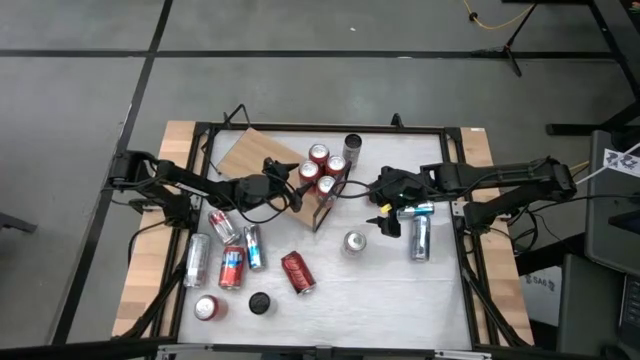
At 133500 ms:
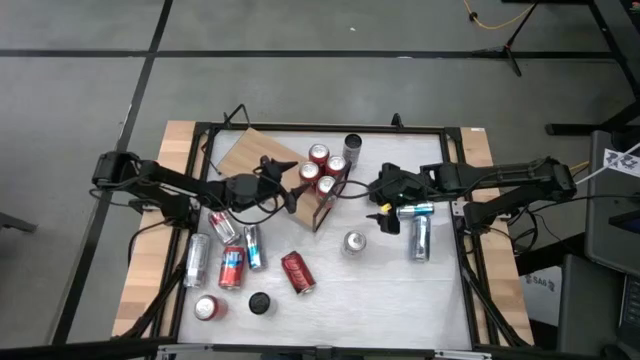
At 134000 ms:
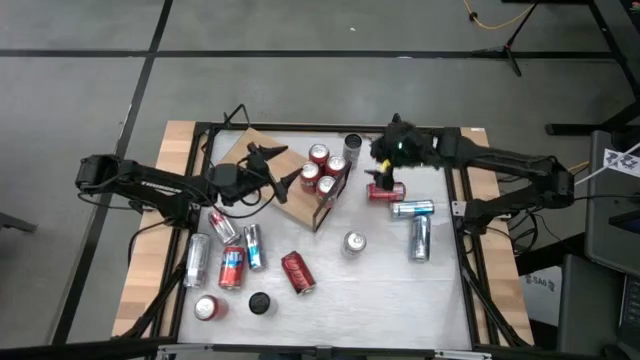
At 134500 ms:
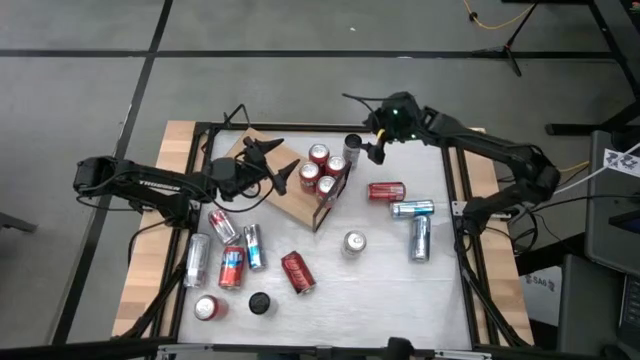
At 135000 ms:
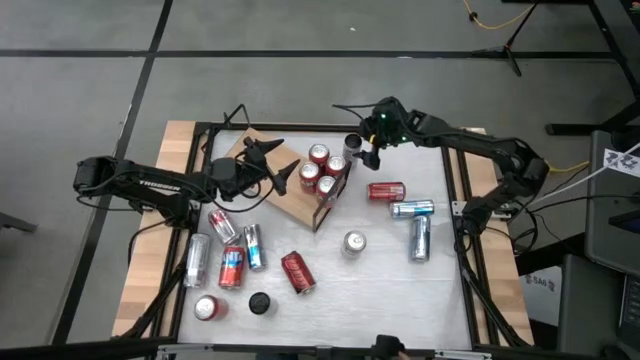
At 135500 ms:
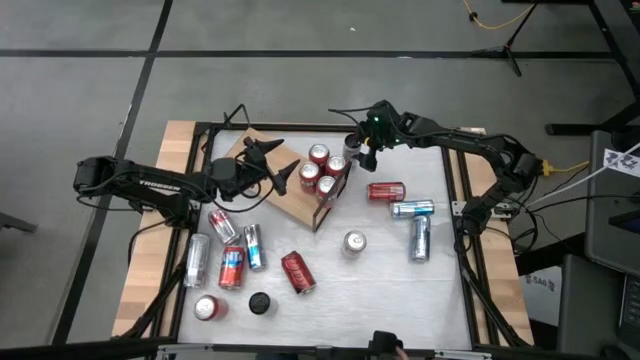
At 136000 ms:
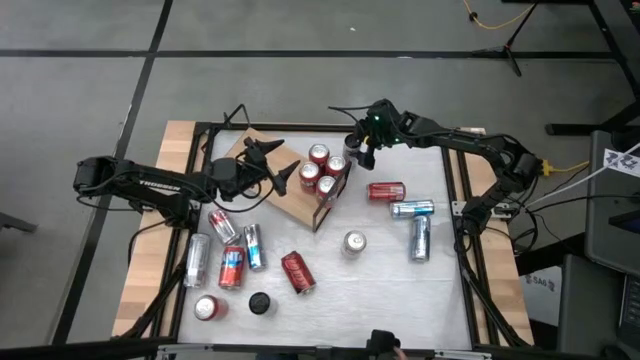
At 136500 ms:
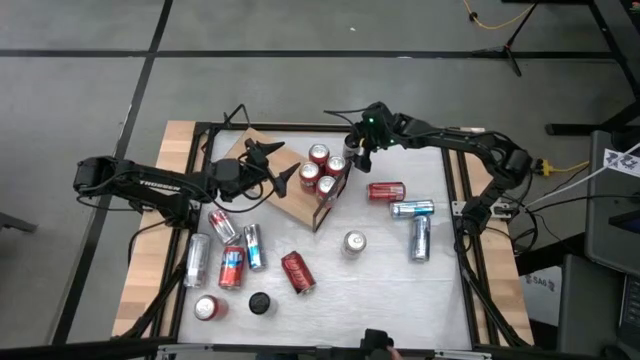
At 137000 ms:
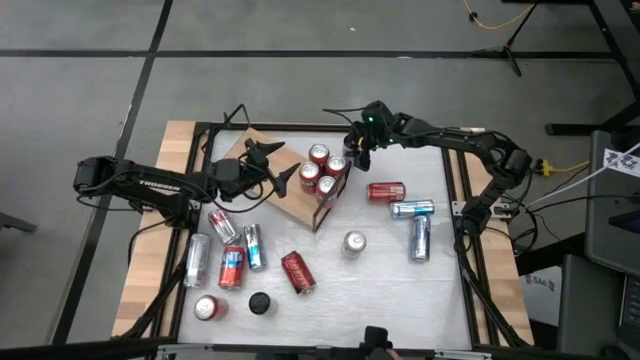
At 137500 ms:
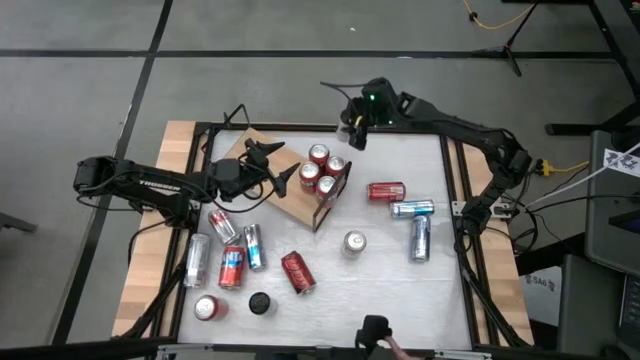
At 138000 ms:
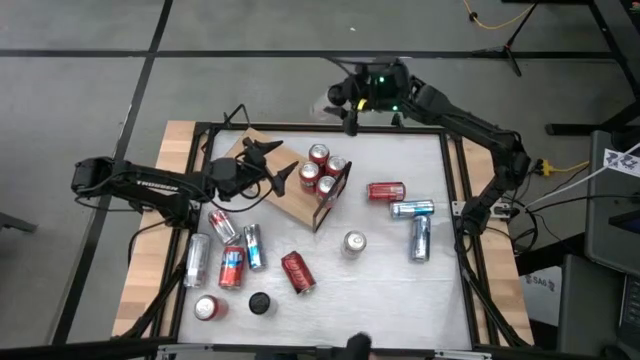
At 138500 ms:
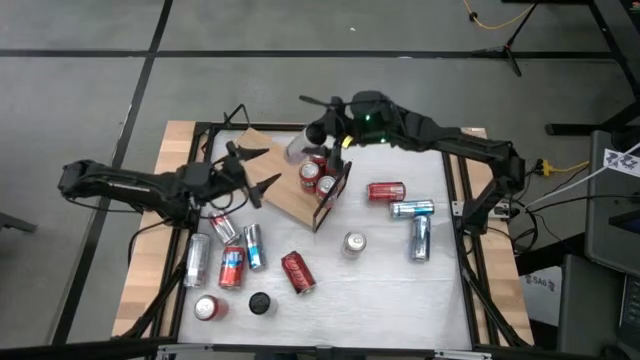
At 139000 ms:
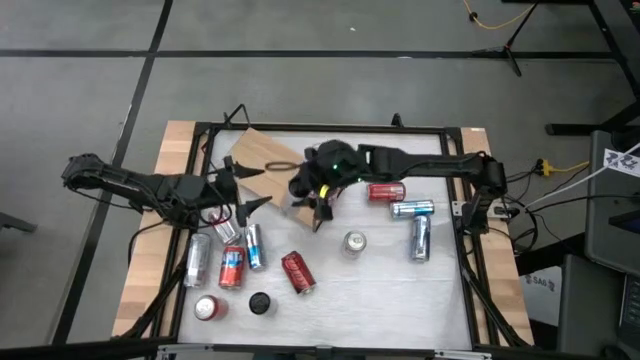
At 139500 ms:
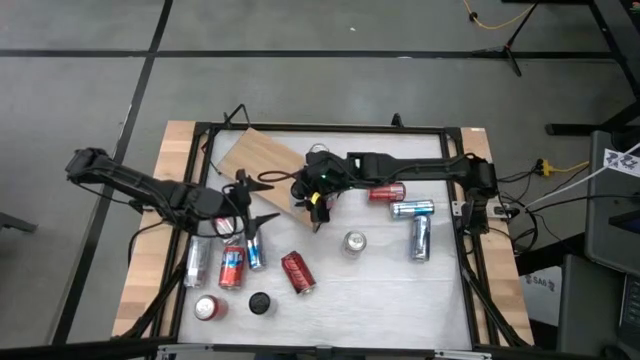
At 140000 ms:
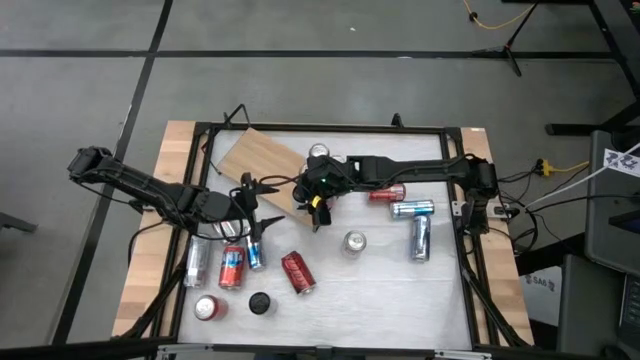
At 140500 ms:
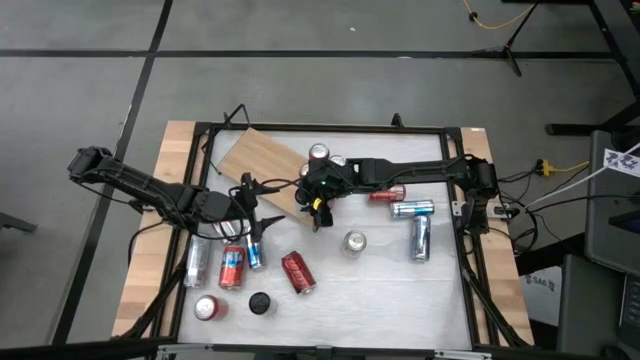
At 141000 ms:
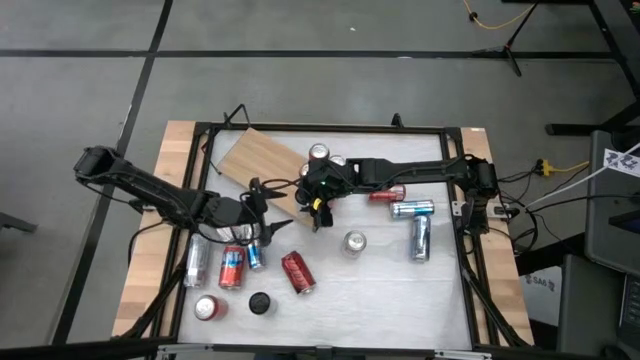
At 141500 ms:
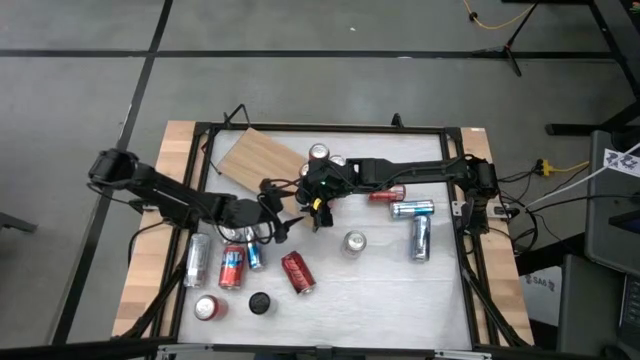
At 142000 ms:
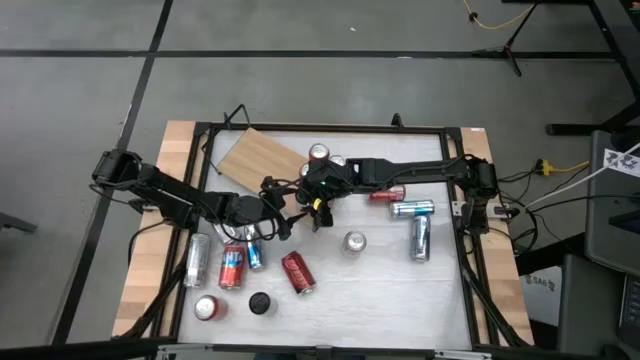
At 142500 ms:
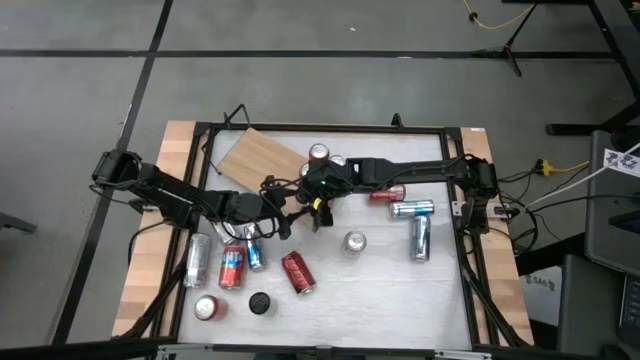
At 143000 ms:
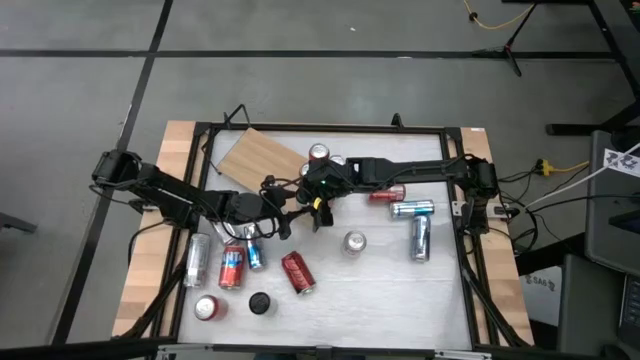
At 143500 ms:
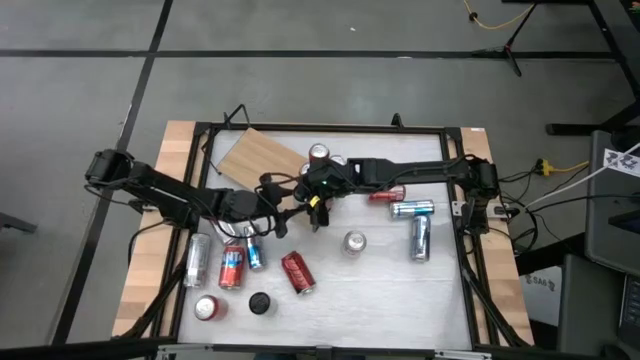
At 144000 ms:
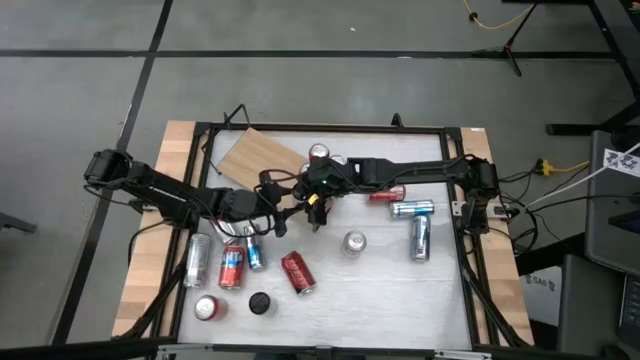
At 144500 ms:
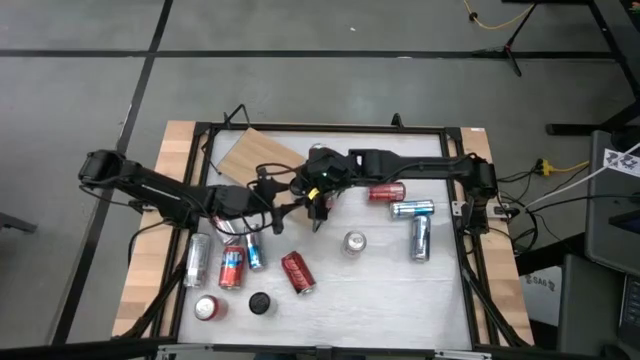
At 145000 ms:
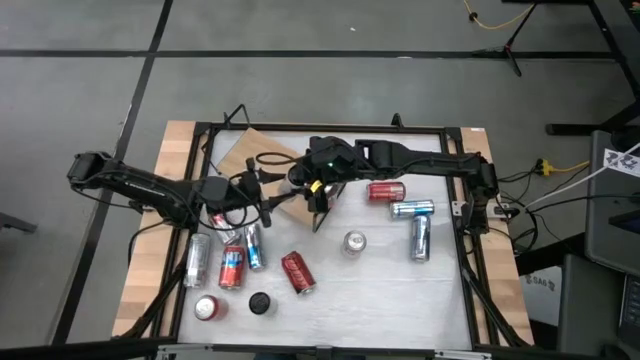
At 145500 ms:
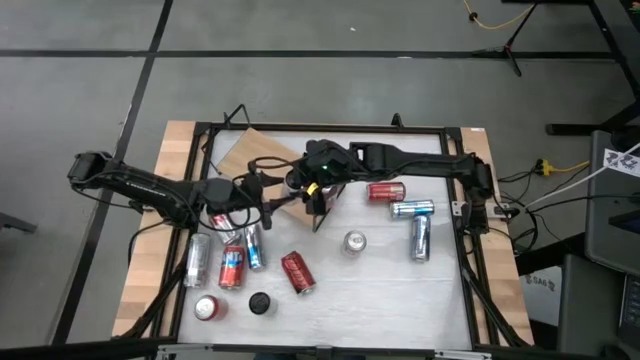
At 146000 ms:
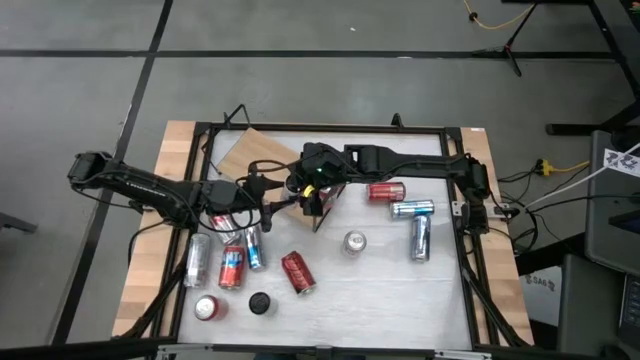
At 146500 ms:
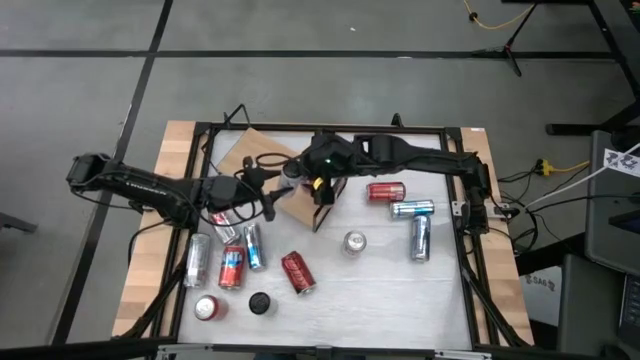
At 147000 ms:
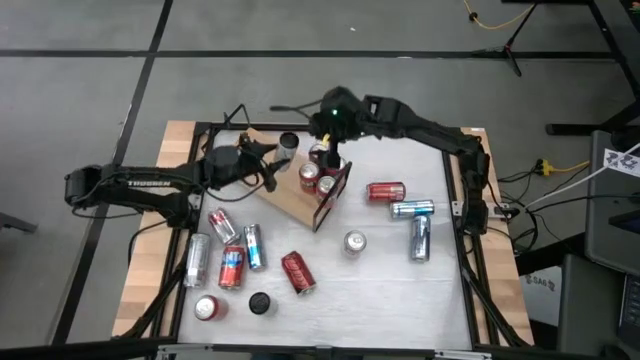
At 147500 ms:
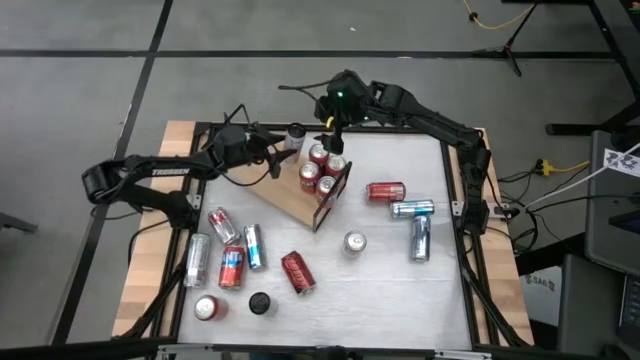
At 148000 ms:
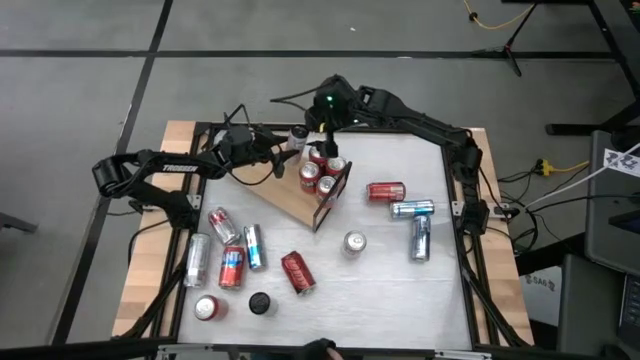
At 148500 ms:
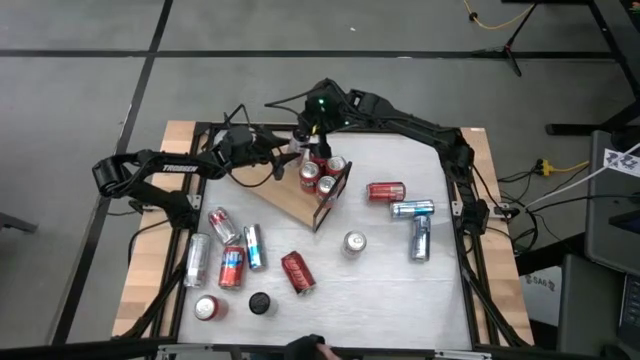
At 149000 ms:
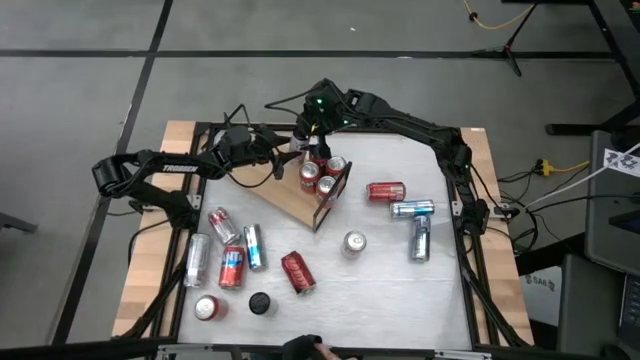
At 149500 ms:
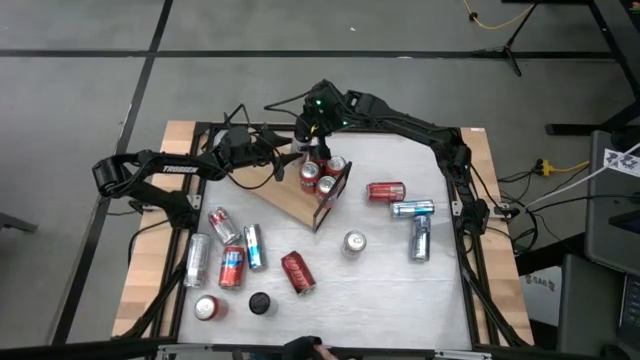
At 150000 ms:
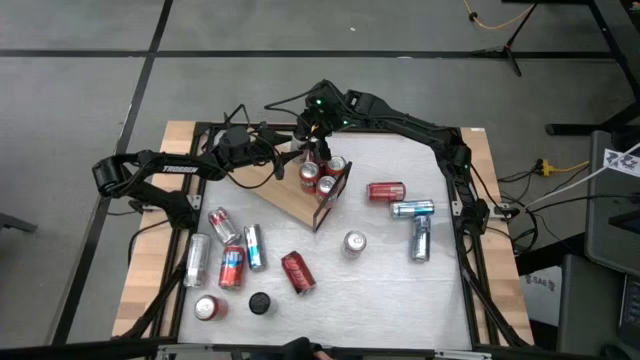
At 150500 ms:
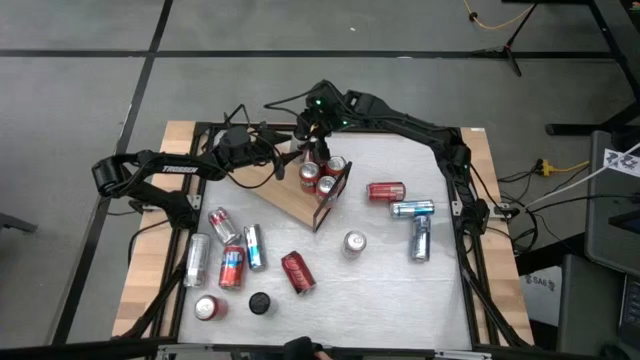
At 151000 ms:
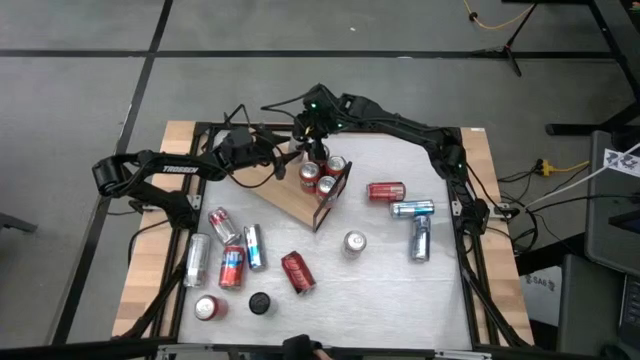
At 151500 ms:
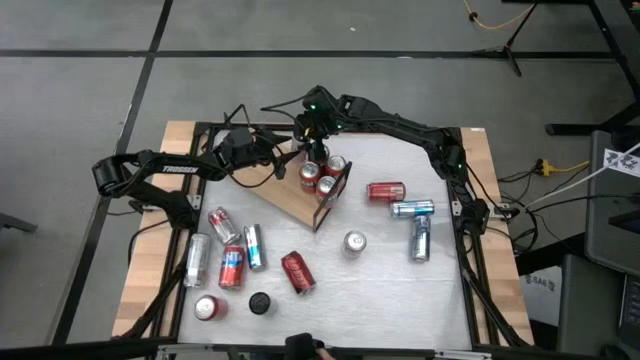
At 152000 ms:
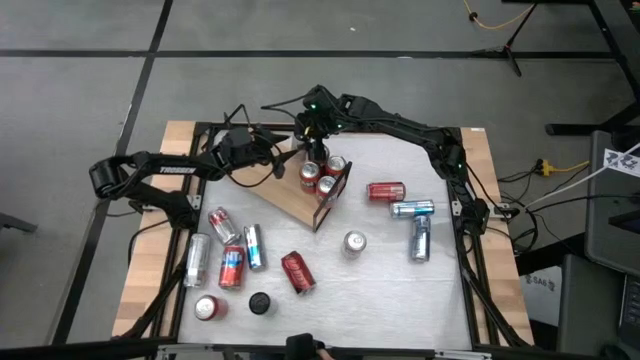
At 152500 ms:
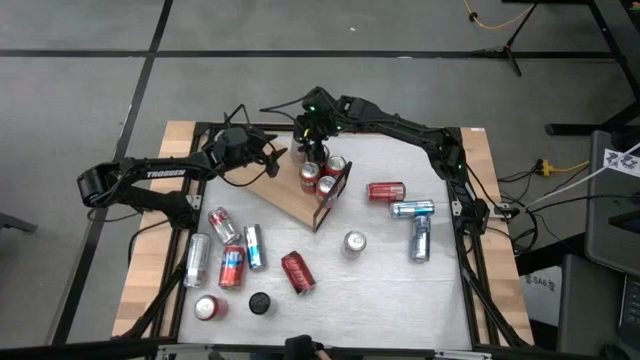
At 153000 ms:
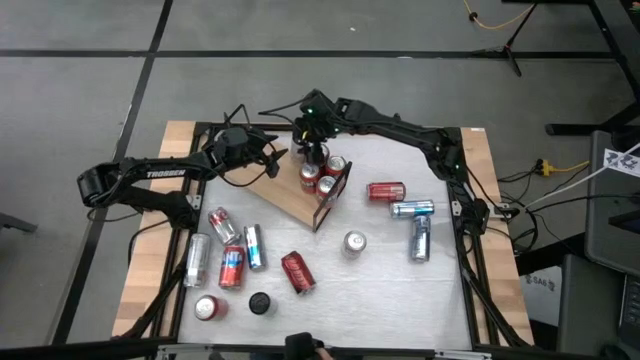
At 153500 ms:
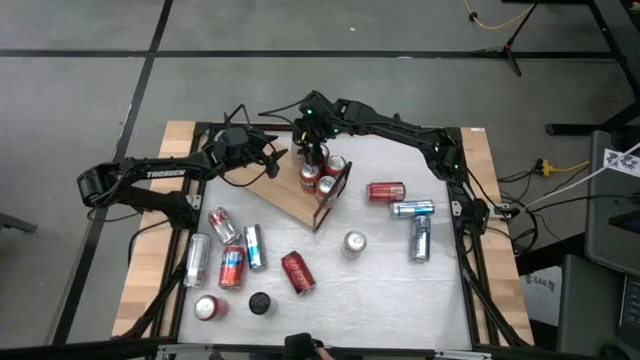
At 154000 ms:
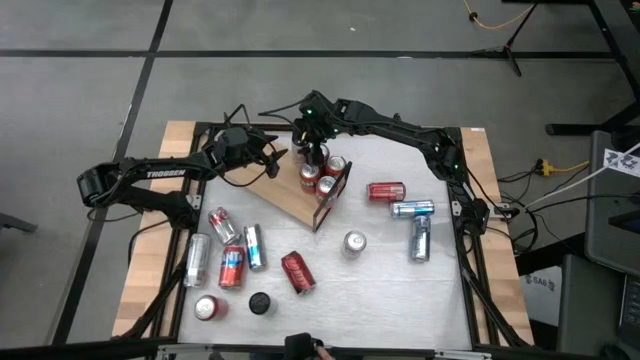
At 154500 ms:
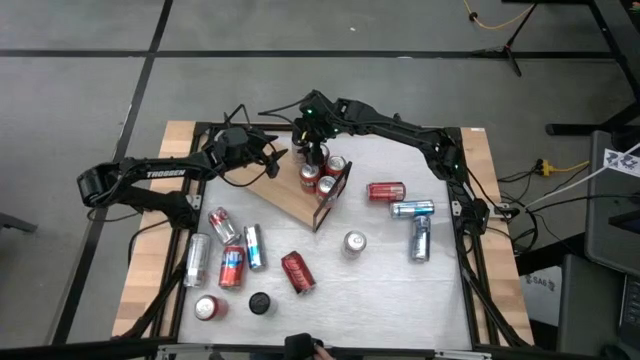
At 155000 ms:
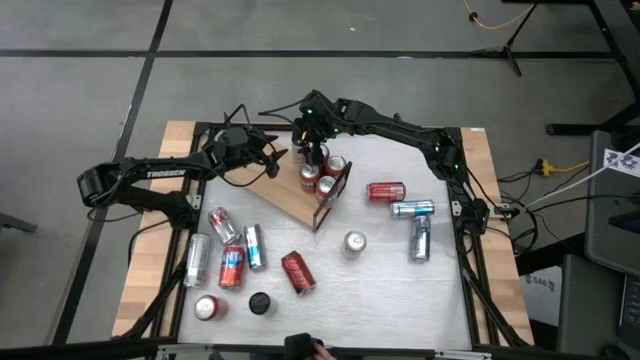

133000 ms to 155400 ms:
Task: Pick and place cans onto a shelf
Put the top pink/white soda can on the shelf
